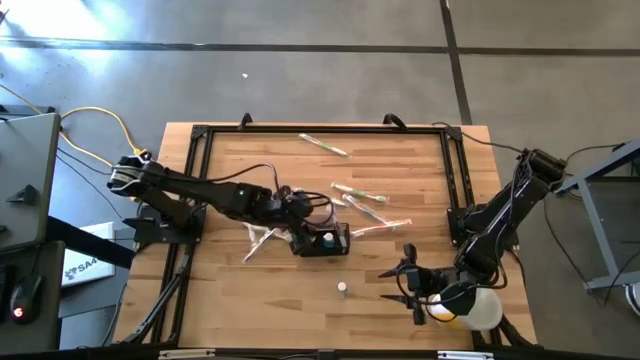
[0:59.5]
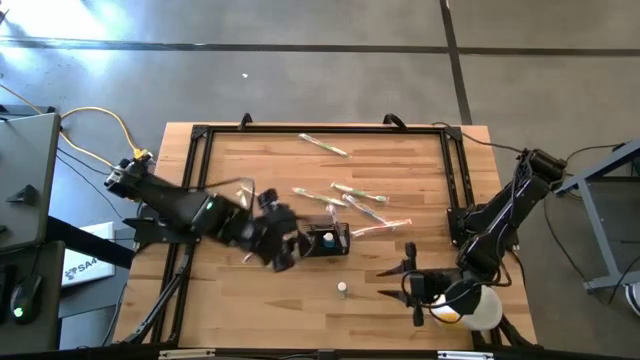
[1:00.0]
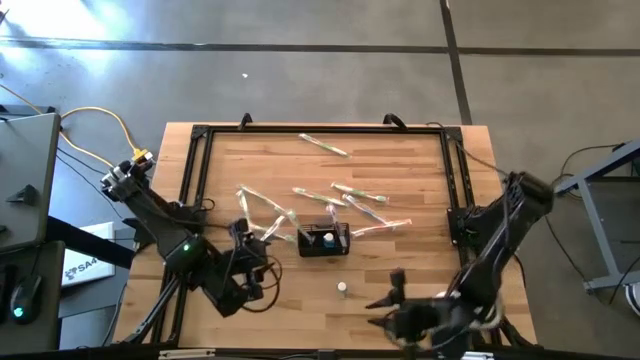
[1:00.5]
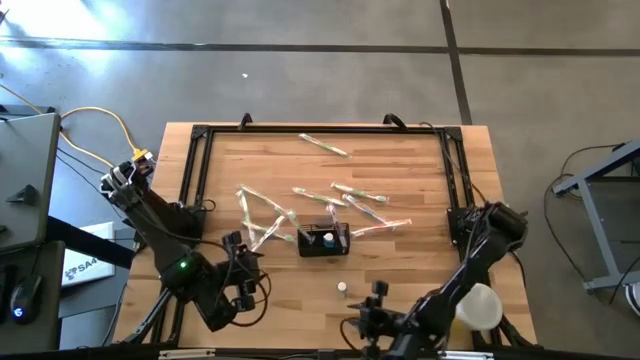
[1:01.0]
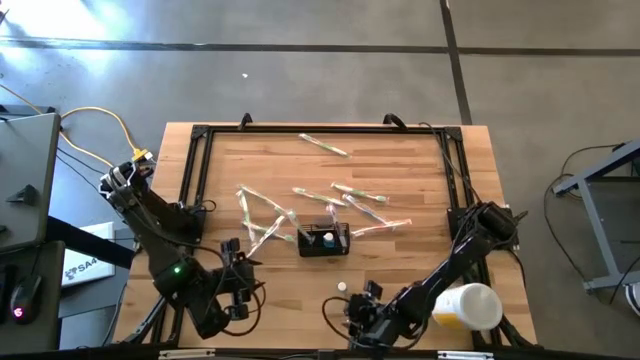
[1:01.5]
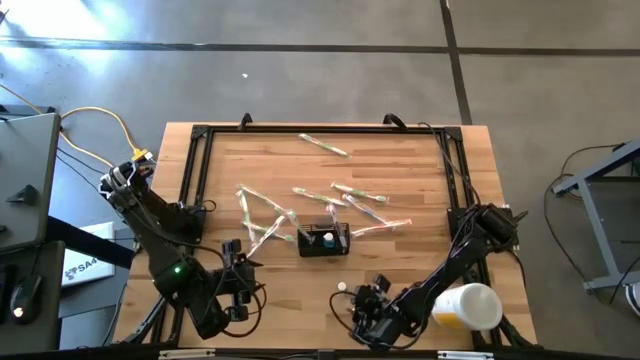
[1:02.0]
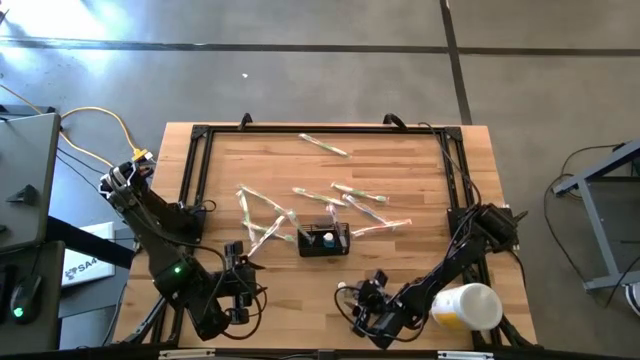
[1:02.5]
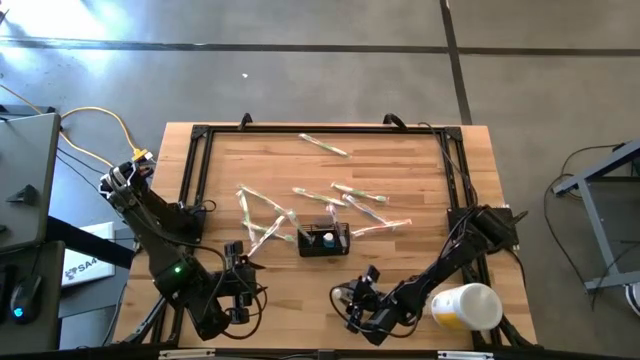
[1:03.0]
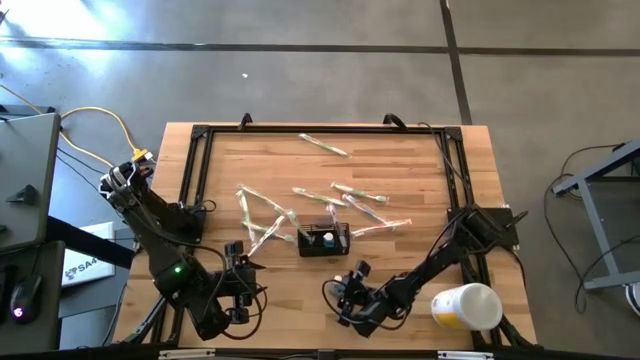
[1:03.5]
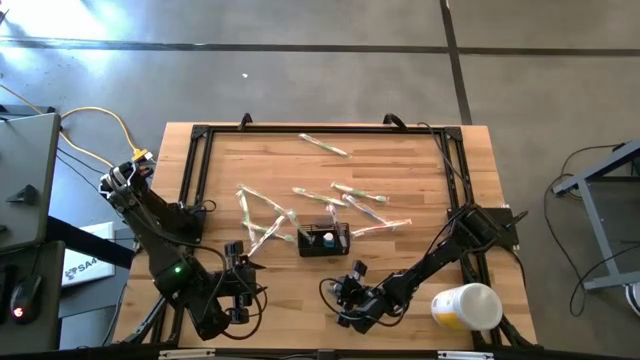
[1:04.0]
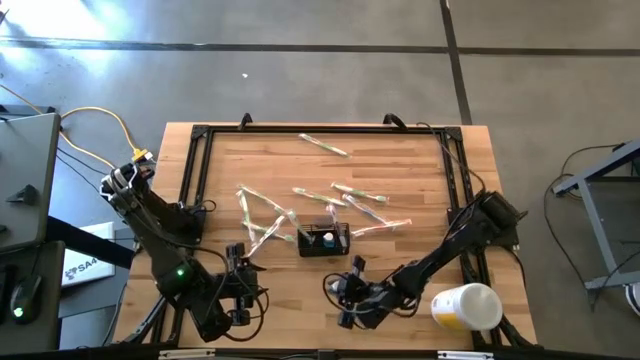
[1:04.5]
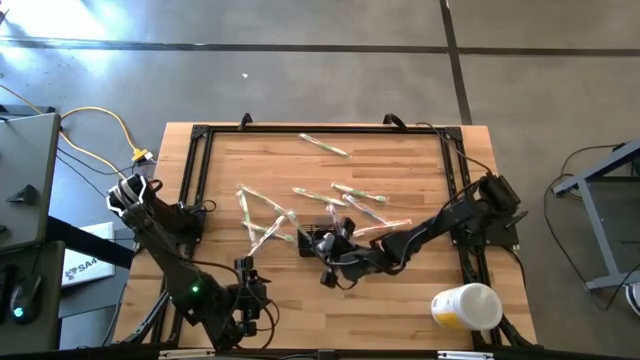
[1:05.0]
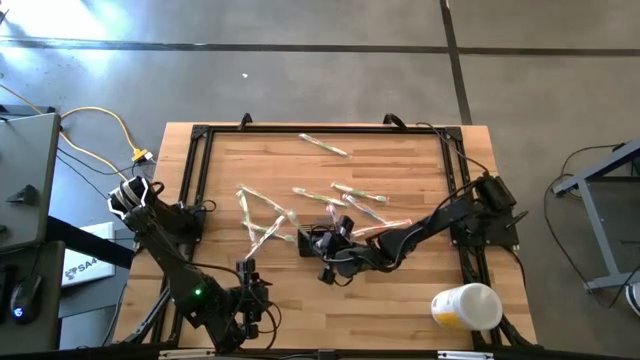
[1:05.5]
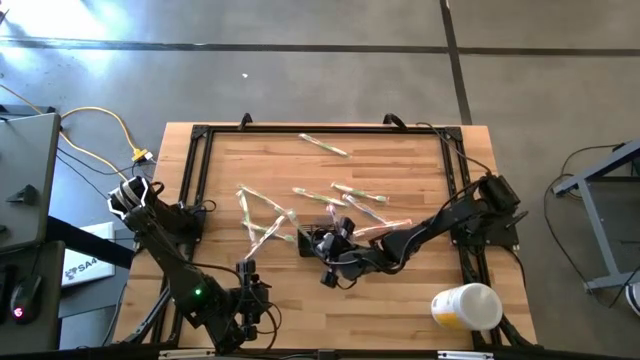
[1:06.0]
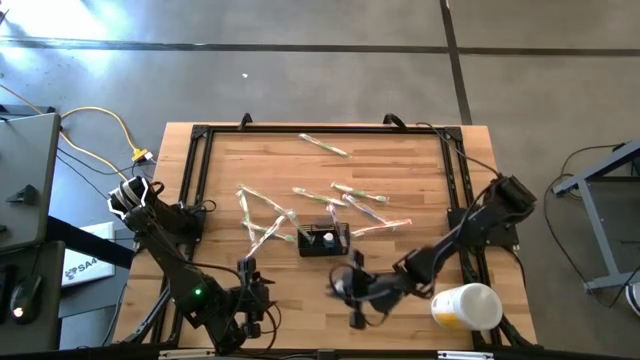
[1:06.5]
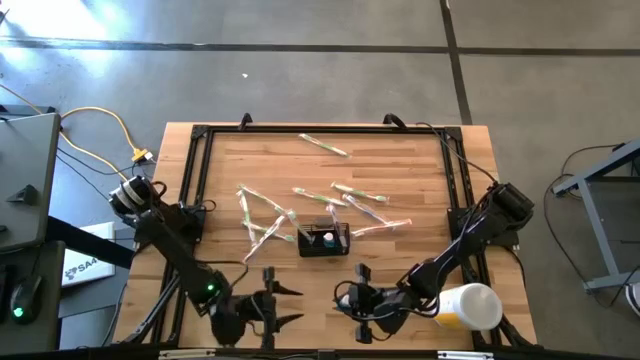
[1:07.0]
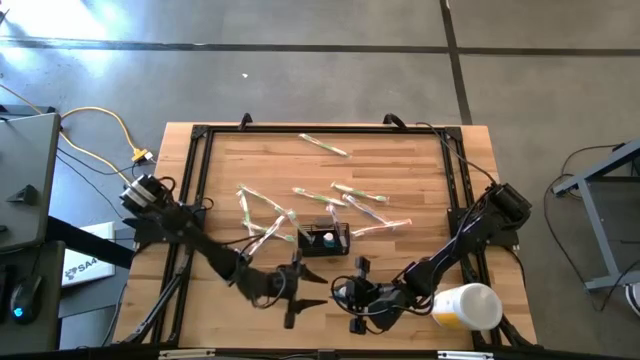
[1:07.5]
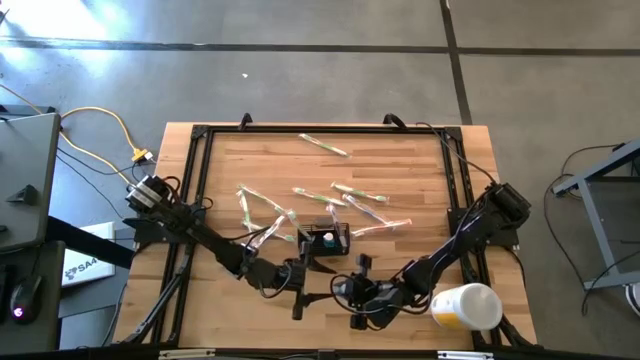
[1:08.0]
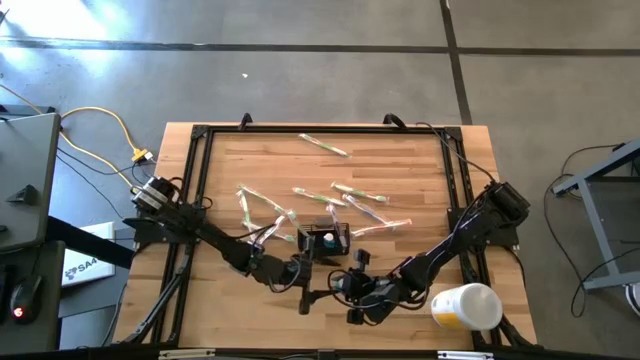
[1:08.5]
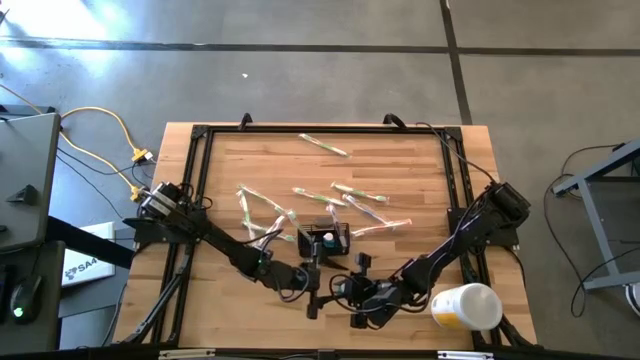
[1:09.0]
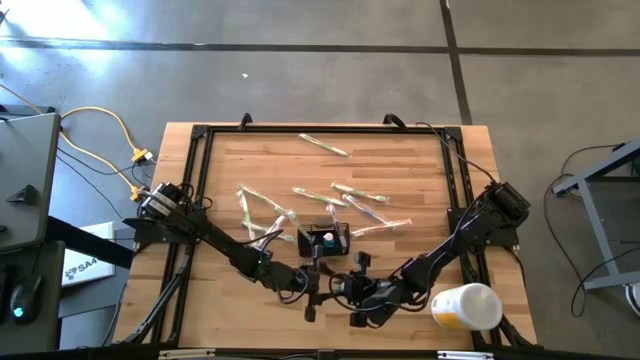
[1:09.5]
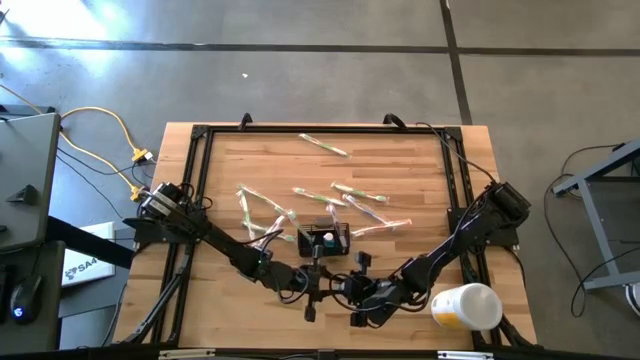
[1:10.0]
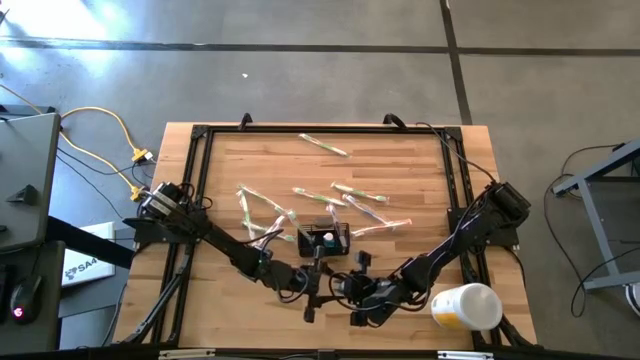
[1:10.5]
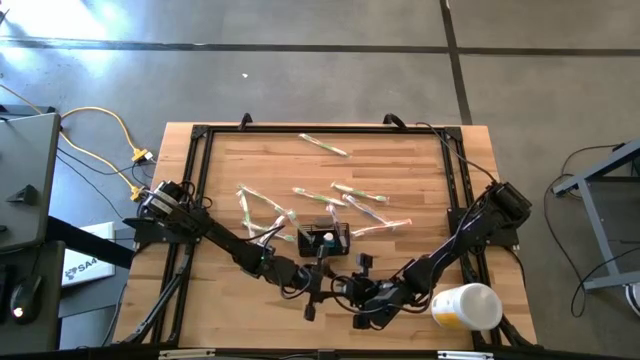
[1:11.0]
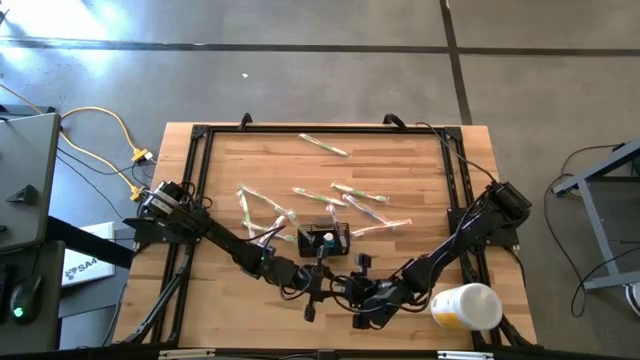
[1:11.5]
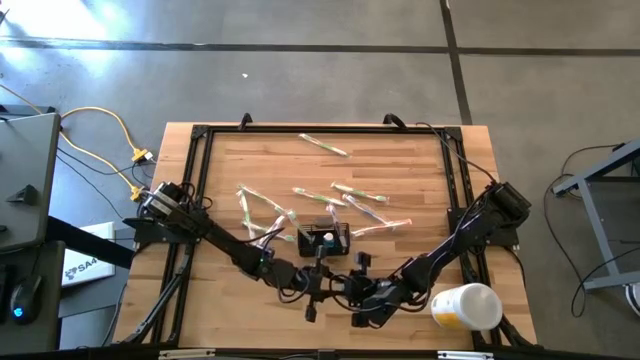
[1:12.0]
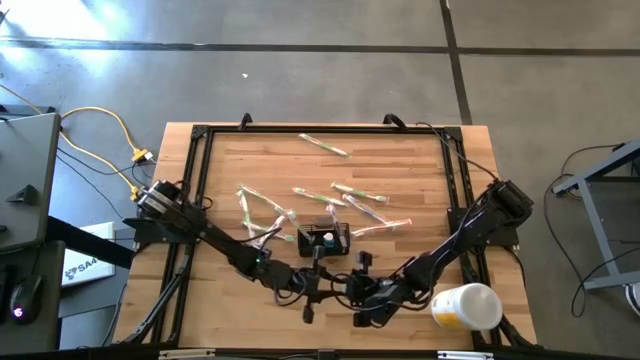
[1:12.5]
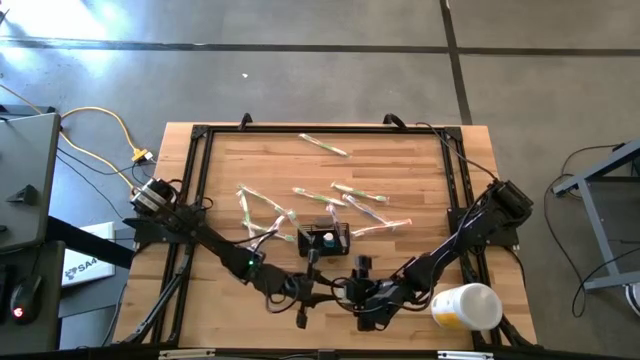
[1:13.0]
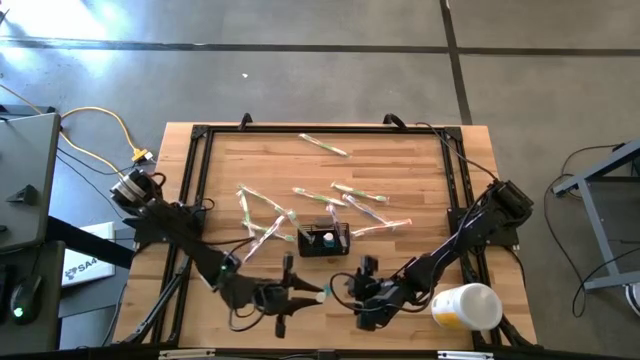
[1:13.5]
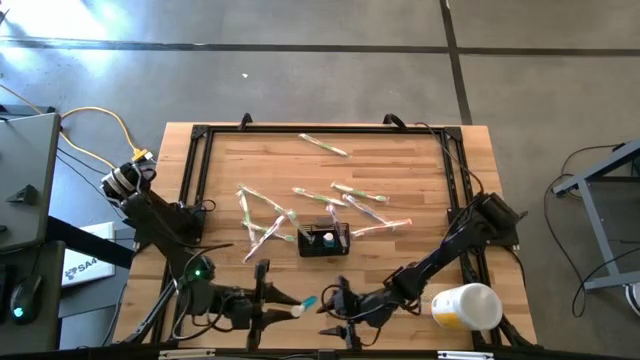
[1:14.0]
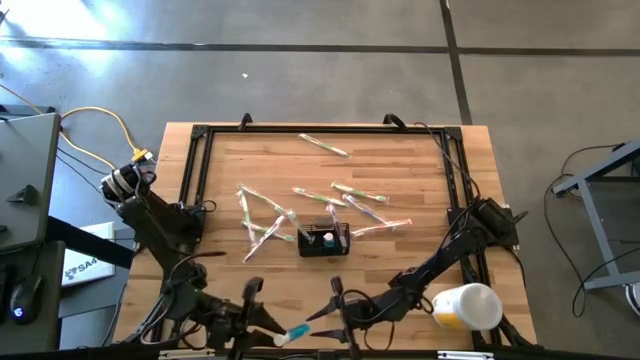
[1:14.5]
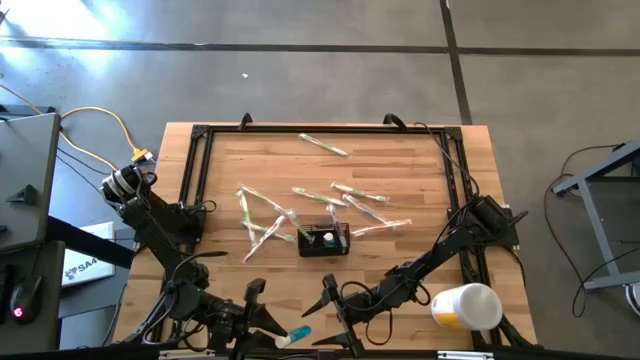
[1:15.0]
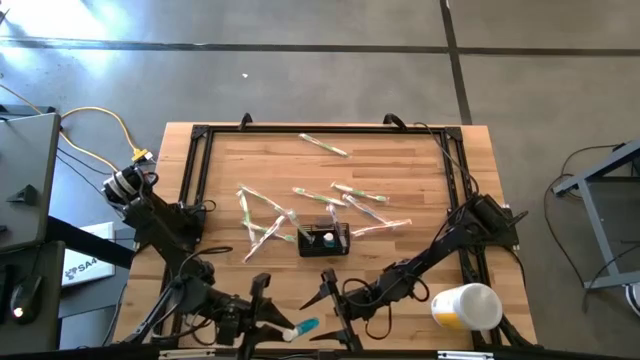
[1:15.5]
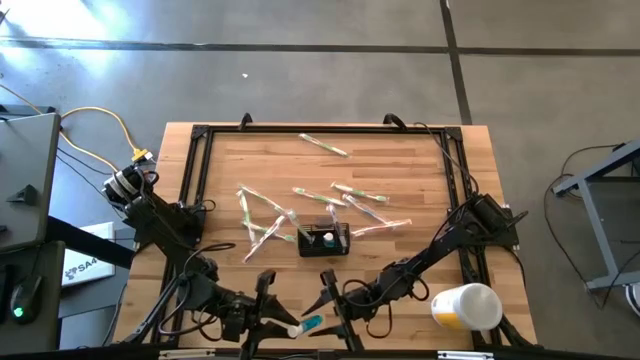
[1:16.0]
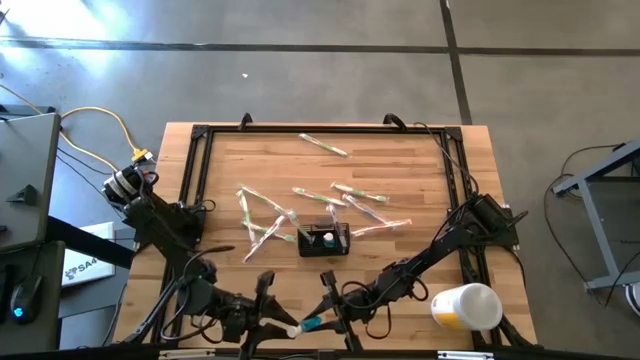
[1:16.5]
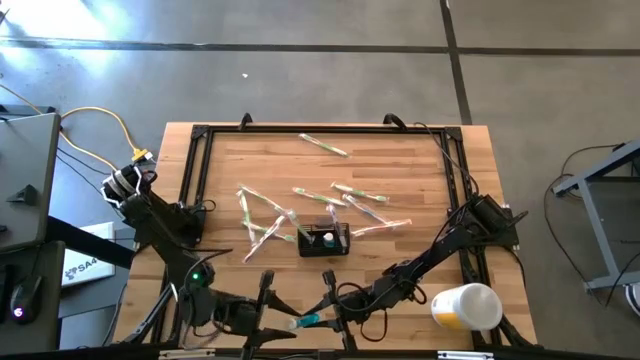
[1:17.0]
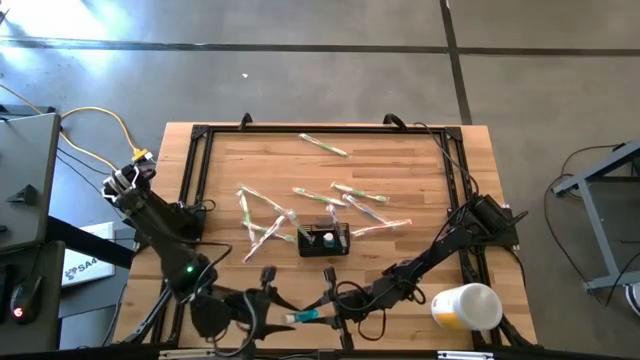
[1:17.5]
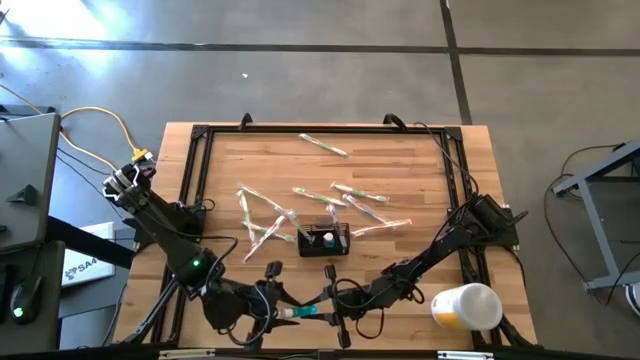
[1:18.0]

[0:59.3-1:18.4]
Task: Pick & Place toothbrushing station
Put the mouthwash into the wire organizer

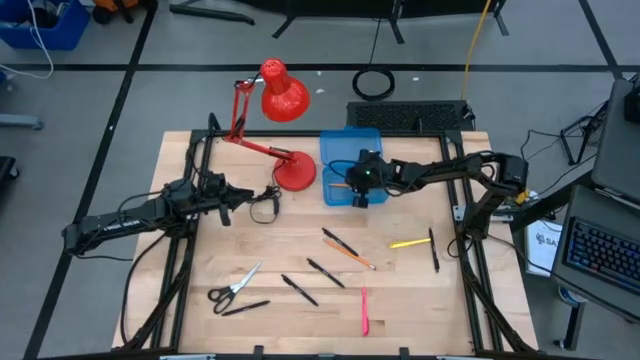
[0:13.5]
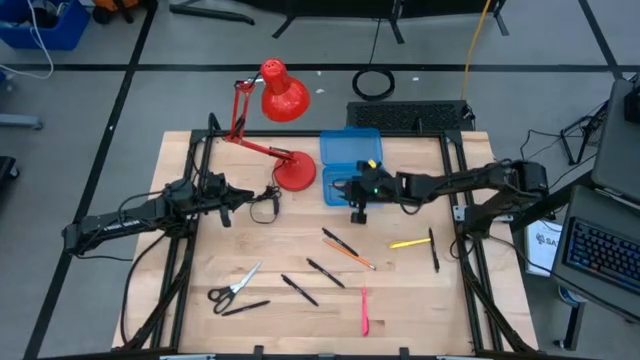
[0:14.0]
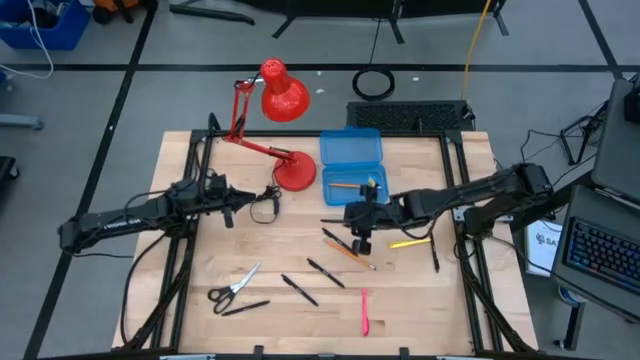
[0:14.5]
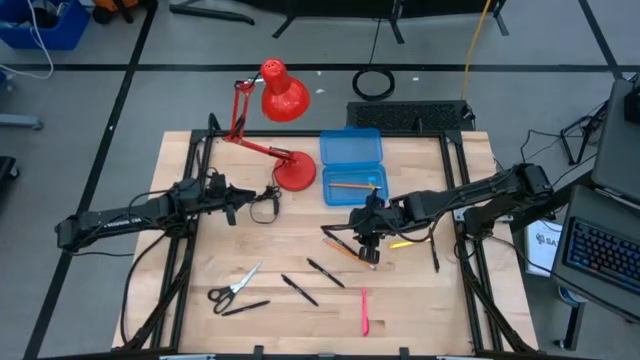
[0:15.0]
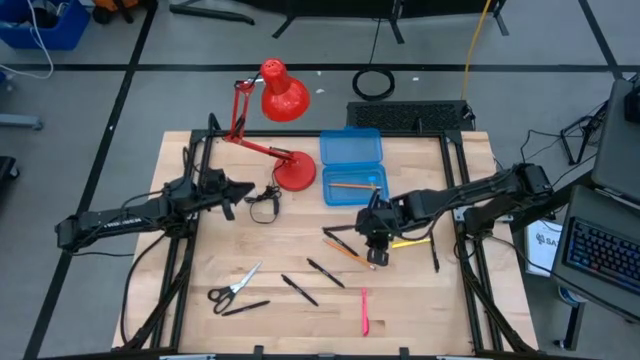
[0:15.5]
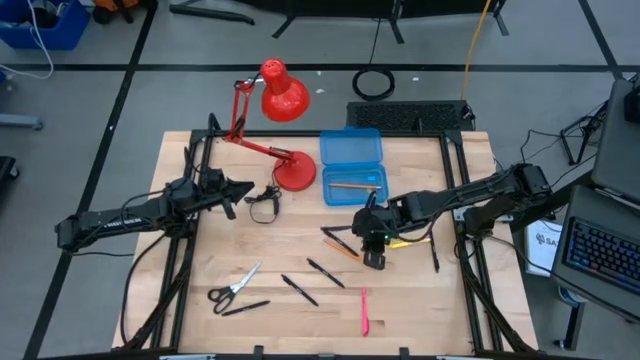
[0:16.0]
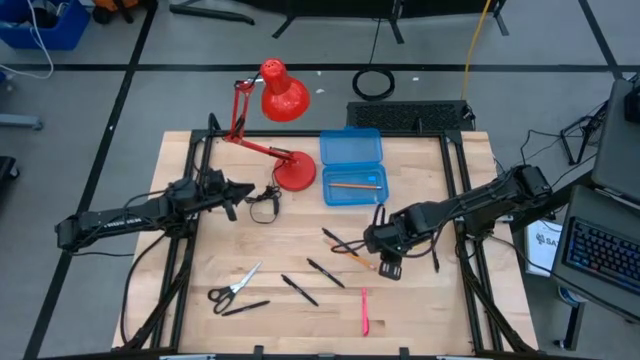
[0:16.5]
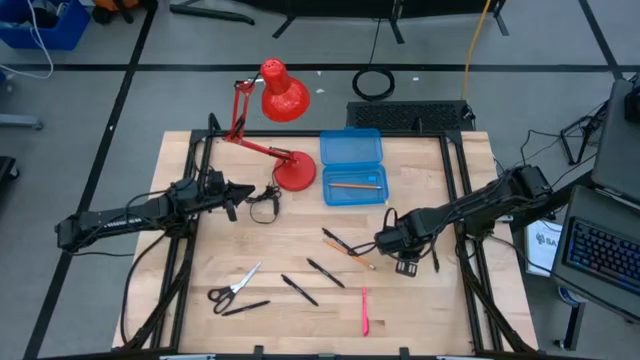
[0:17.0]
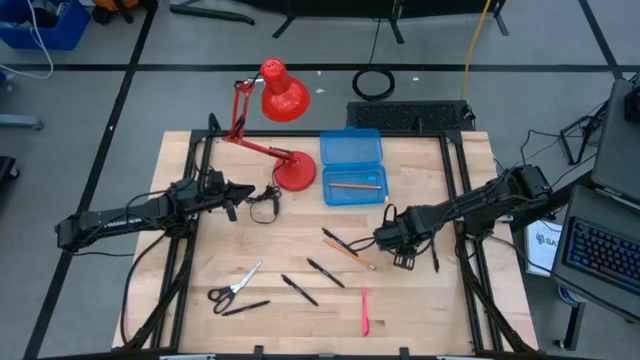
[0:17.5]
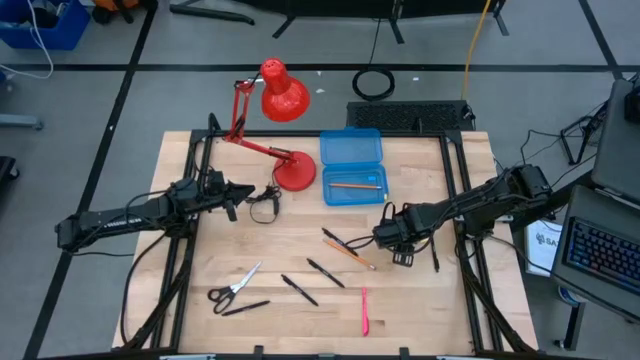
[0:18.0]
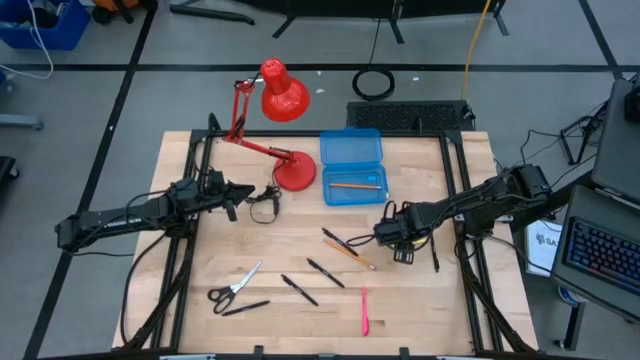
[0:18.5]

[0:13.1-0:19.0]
Task: Pick & place school supplies into a supply box
Put the yellow pen into the blue supply box
